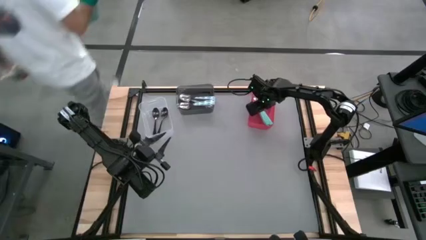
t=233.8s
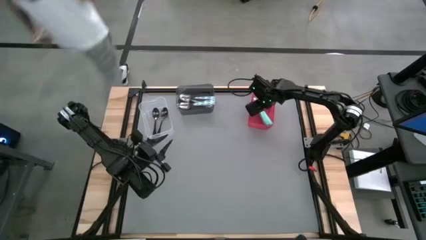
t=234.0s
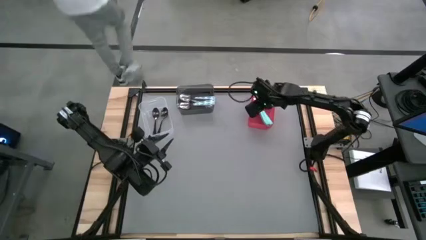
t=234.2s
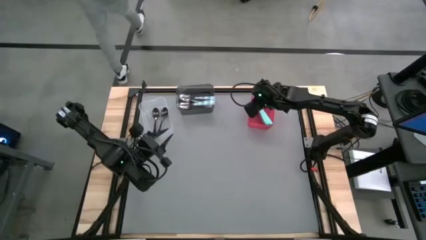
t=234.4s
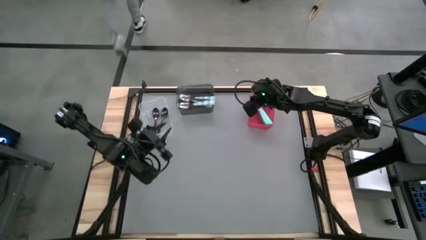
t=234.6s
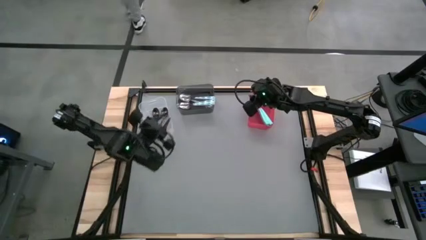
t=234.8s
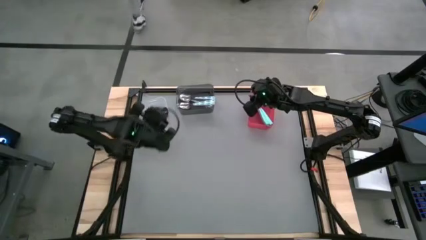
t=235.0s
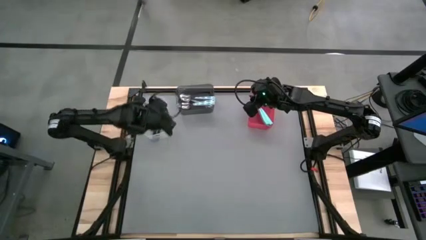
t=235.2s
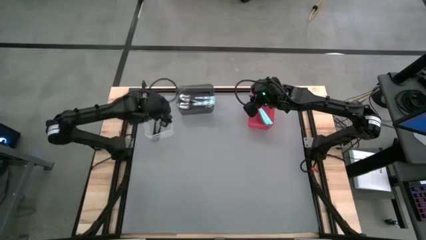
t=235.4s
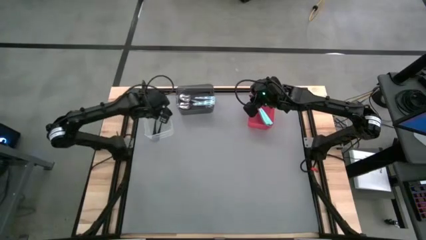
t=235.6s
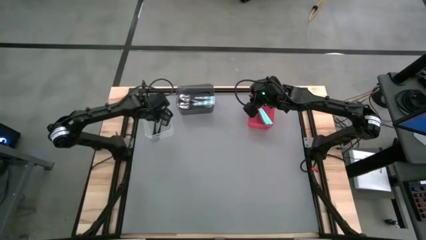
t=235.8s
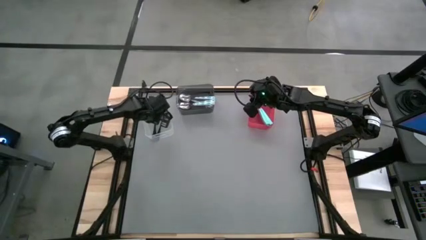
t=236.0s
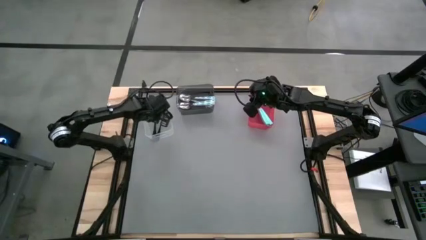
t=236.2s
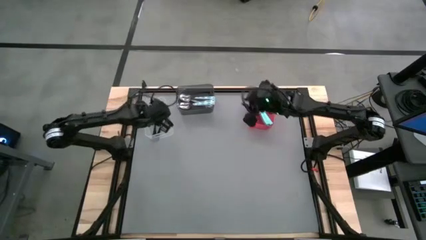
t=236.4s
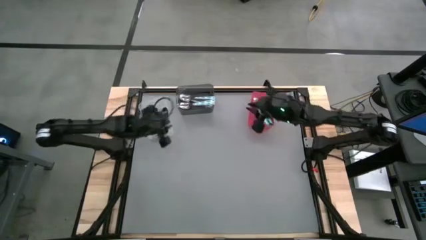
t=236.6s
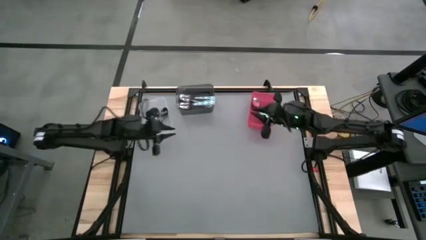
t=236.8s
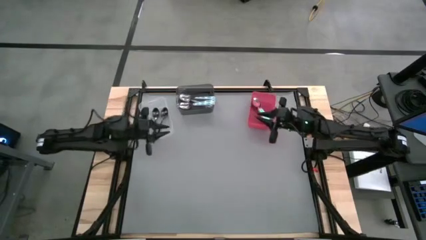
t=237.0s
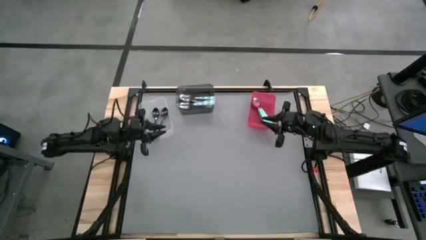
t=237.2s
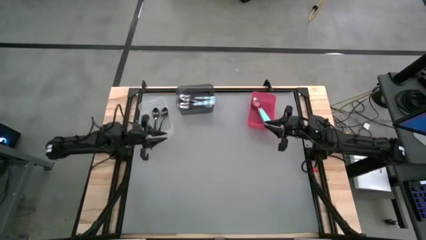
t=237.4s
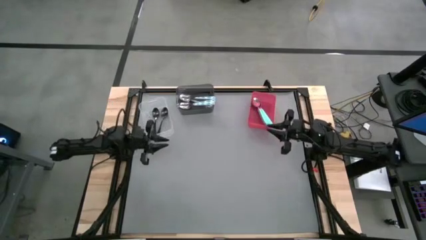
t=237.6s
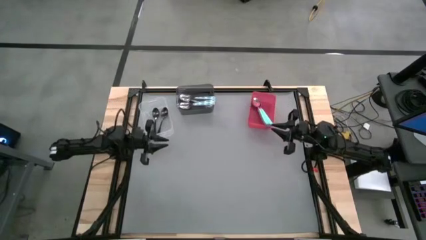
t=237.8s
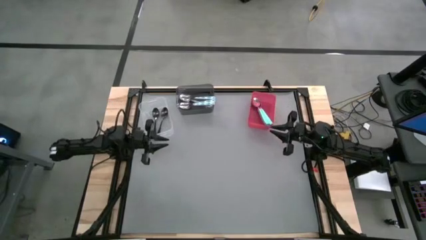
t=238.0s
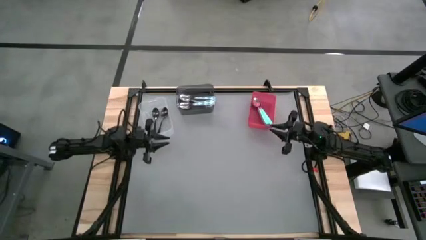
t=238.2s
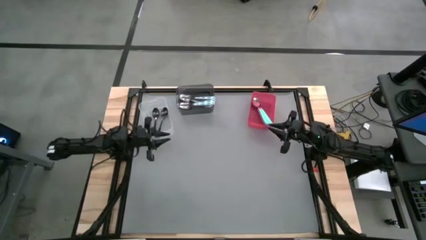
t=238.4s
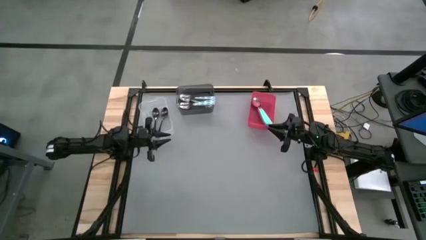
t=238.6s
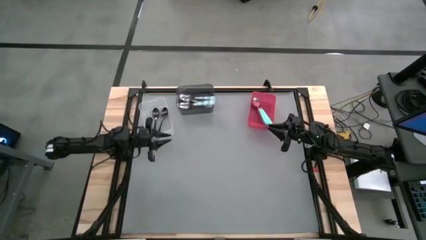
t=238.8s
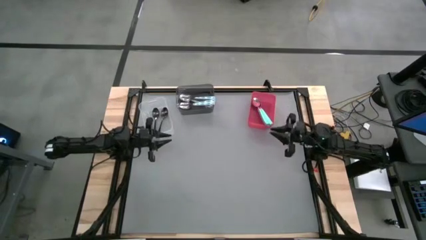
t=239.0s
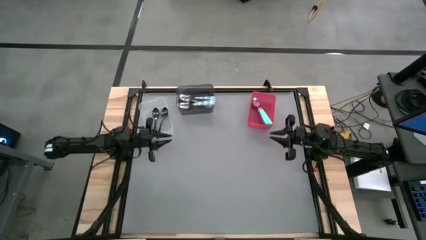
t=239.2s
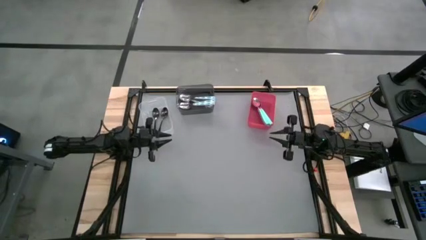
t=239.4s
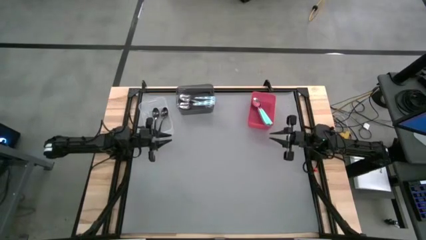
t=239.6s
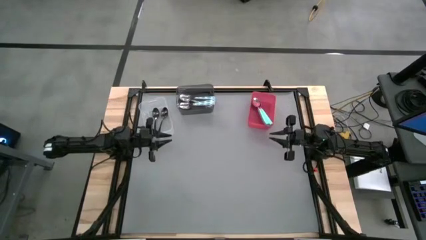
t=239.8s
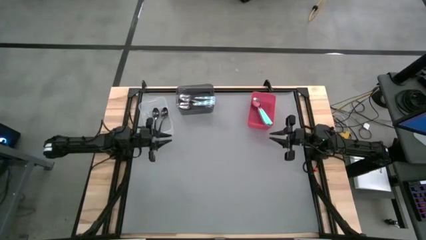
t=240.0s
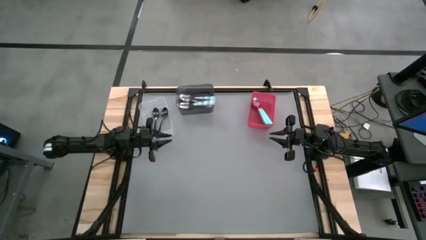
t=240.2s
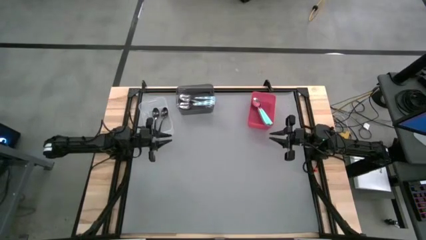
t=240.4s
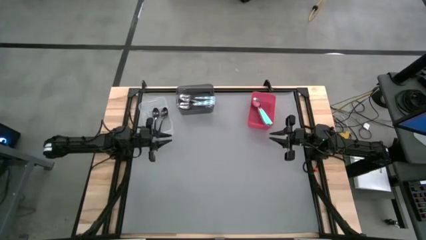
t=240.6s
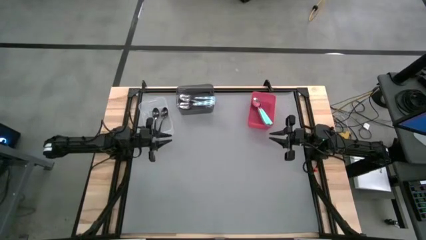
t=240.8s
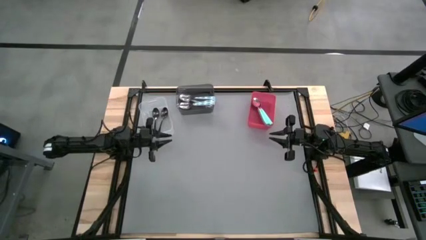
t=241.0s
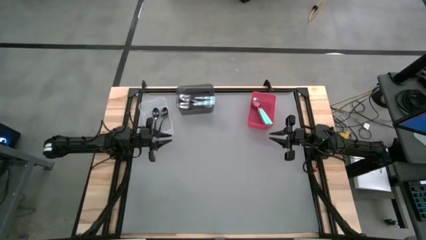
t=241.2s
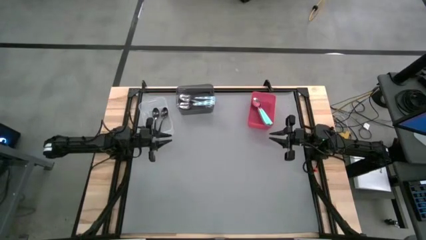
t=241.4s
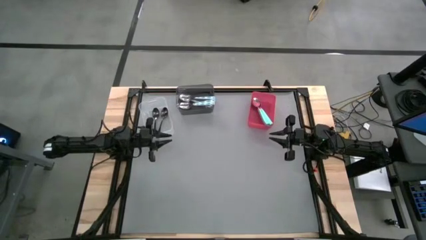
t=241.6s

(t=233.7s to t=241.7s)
Task: Sort silverware by color (type)
Return to Home Position

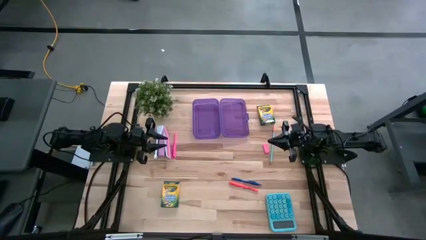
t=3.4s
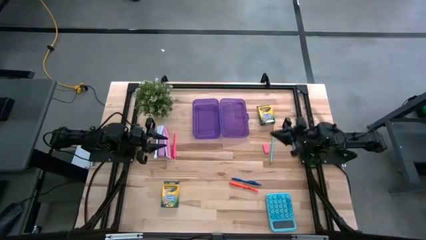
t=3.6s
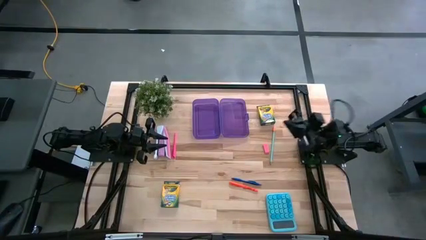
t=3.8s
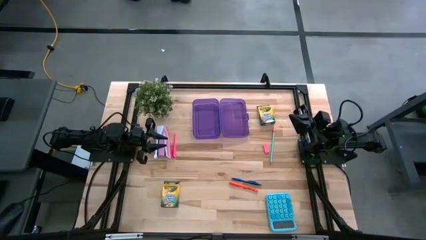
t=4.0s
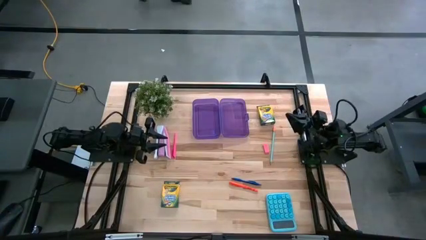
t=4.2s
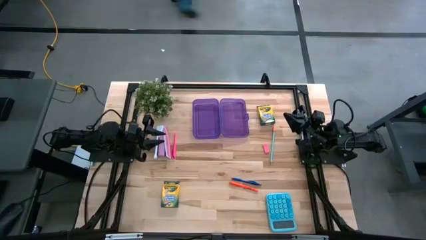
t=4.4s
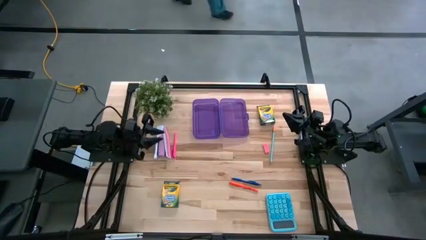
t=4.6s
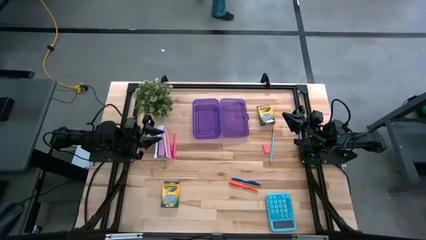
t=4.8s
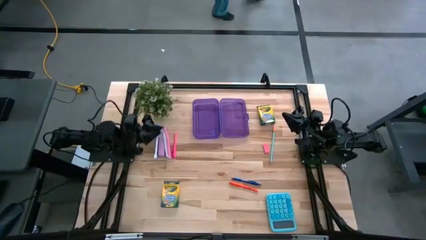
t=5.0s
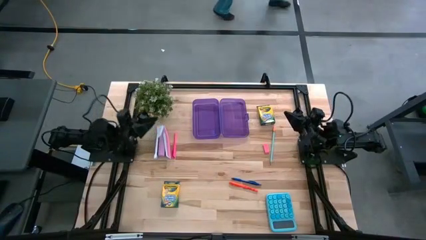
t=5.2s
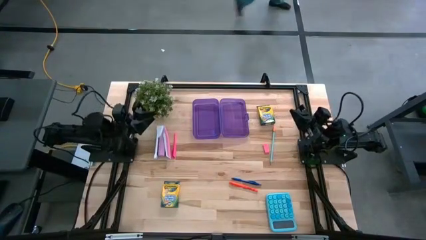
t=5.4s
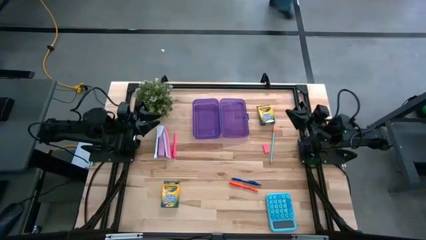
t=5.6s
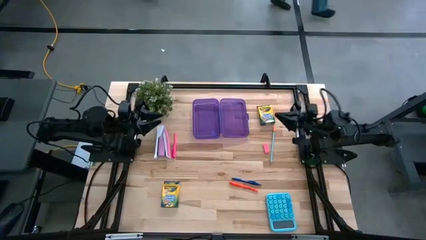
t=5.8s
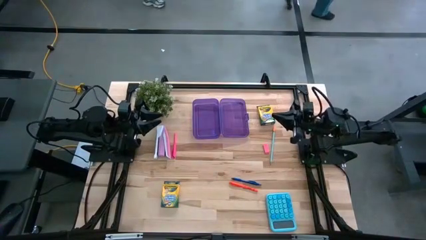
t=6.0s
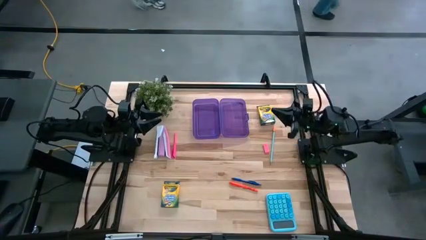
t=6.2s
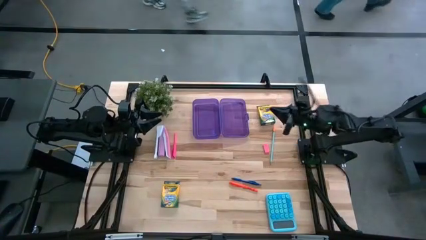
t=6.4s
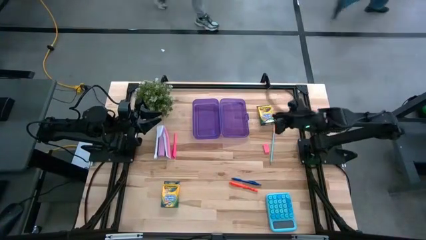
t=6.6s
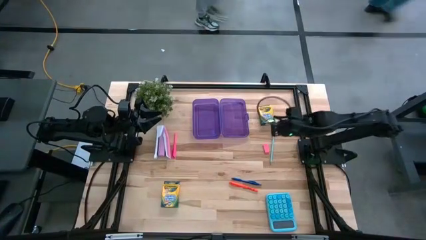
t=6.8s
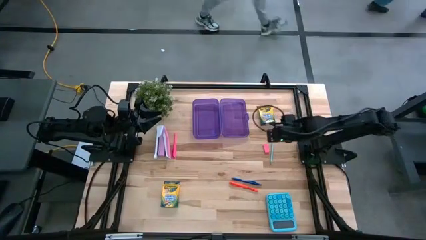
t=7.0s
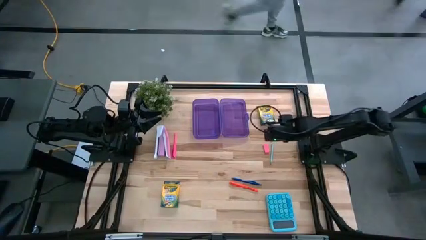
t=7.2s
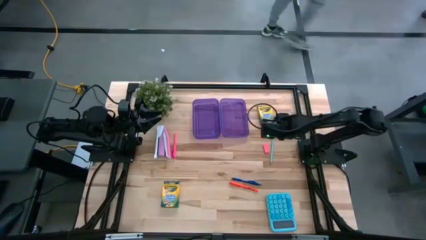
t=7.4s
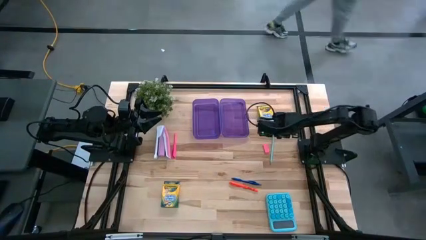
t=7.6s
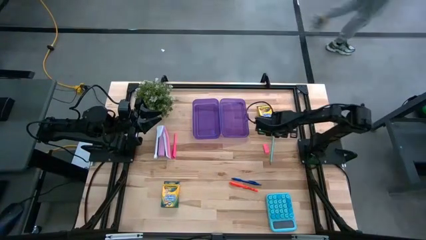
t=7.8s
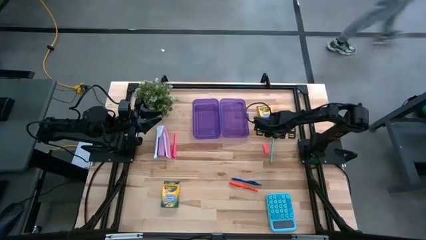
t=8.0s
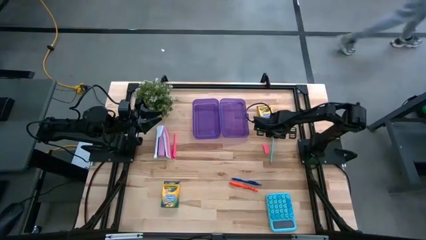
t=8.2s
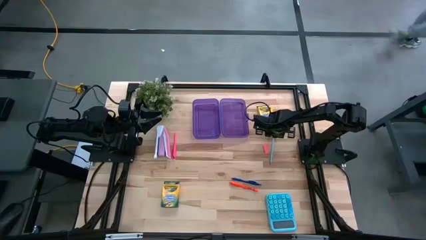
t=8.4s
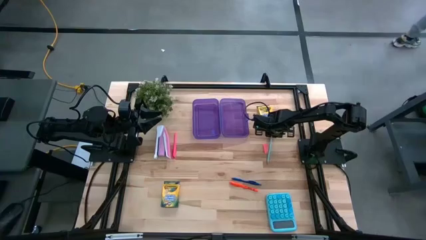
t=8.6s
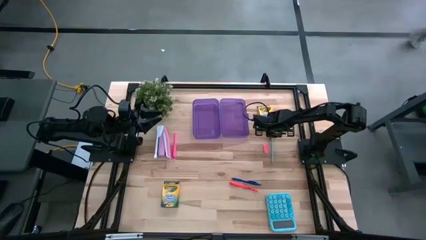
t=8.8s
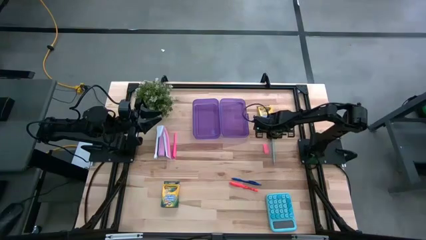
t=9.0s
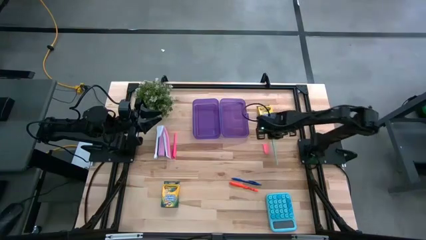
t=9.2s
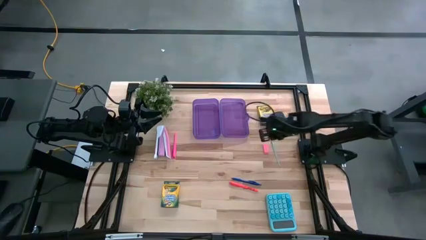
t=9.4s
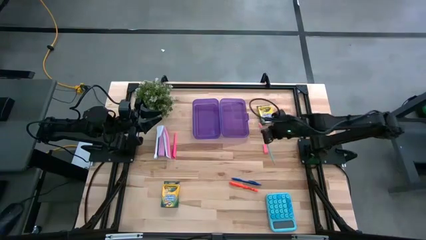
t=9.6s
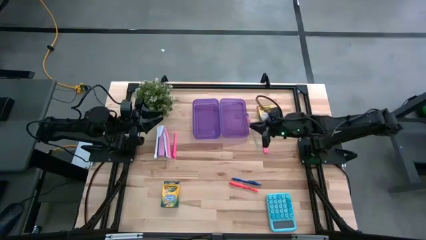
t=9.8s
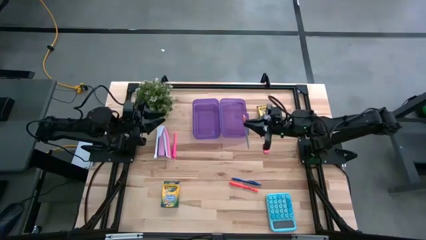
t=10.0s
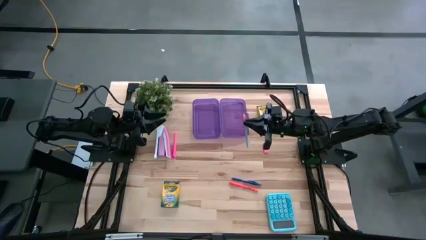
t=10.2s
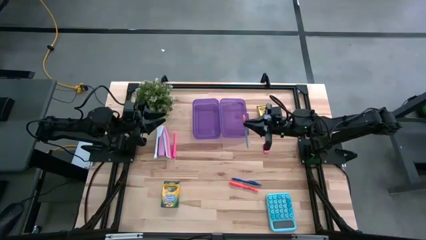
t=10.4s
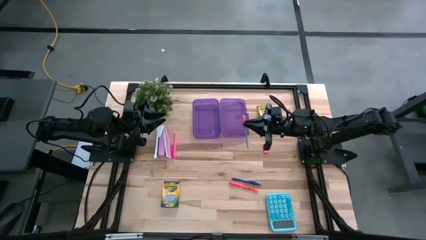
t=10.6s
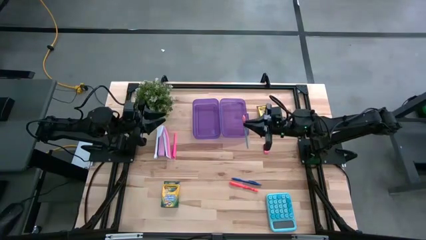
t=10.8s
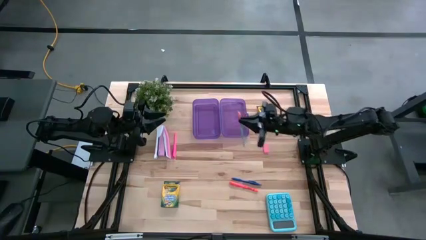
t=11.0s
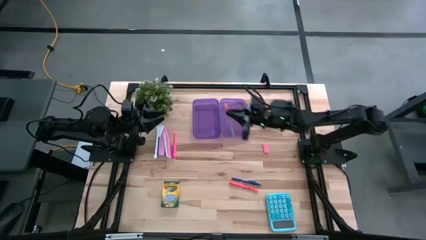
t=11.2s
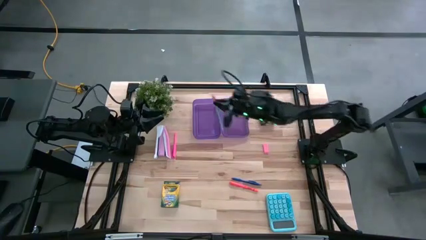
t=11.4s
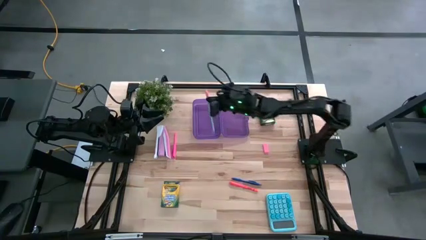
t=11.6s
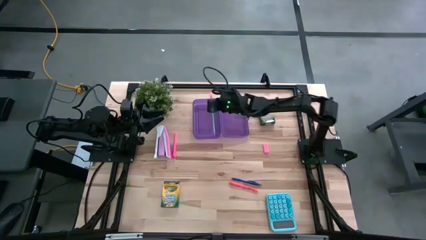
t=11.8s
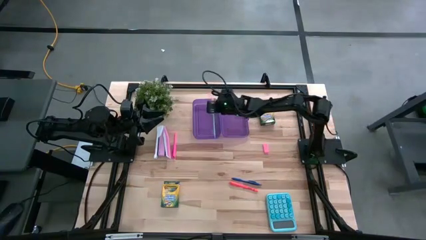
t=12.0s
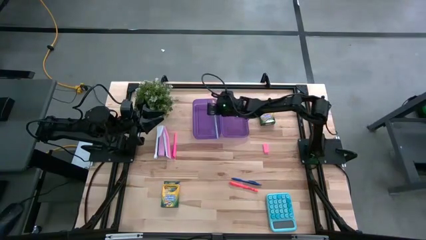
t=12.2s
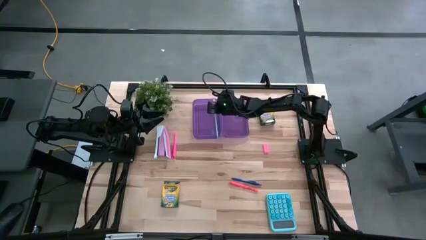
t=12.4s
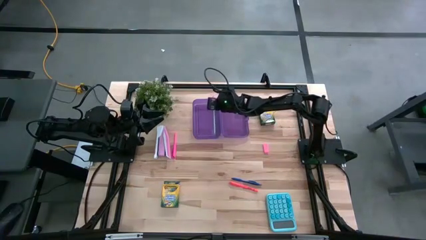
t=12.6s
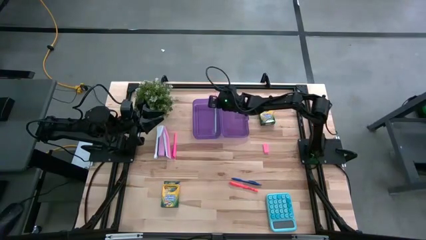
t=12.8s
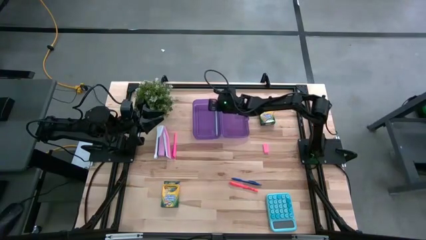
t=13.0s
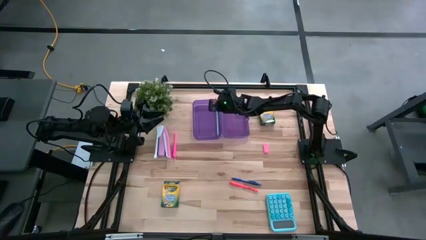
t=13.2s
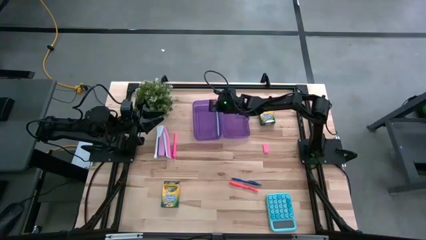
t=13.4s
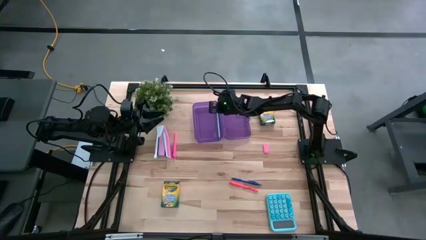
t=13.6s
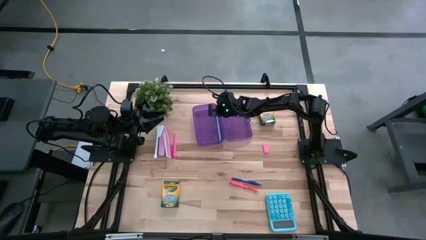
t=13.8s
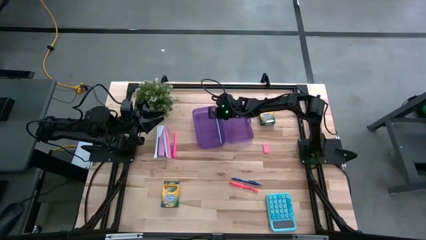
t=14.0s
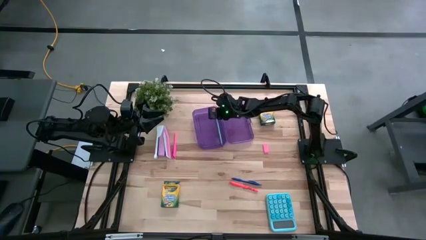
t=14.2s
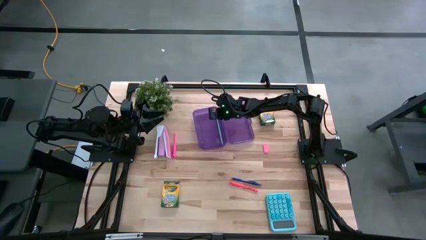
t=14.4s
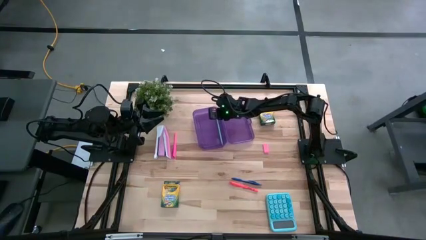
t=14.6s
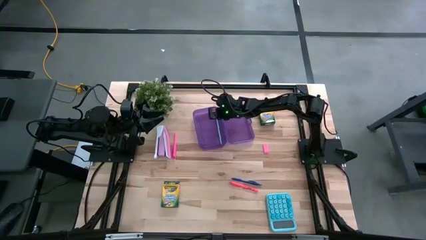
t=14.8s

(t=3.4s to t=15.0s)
Task: Pick & place school supplies into a supply box
Put the blue pencil into the purple supply box
